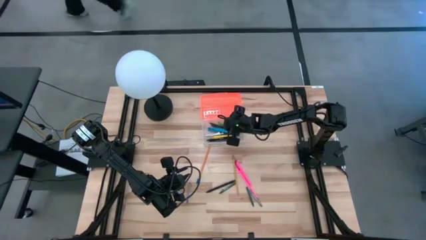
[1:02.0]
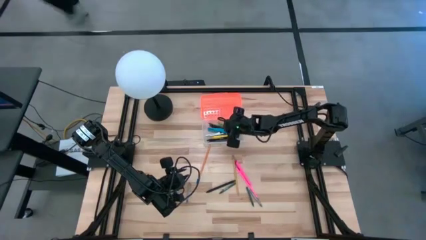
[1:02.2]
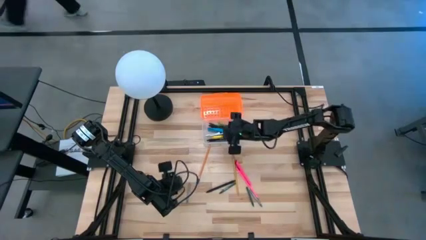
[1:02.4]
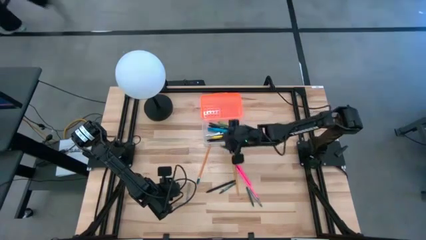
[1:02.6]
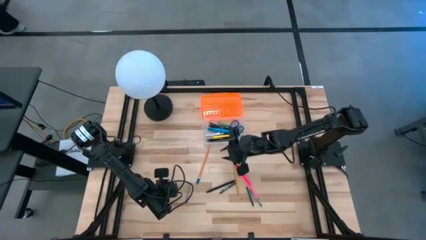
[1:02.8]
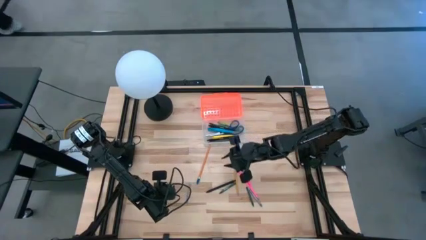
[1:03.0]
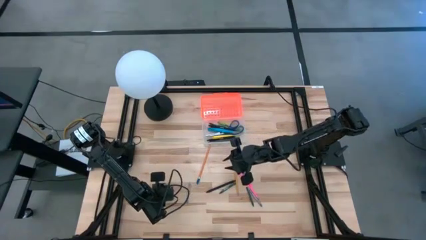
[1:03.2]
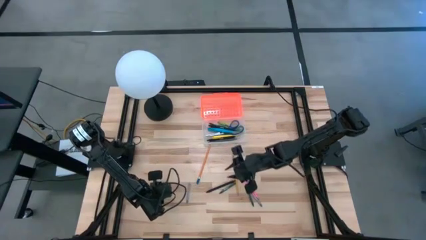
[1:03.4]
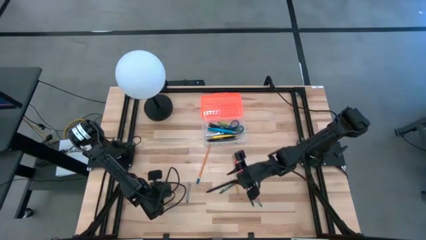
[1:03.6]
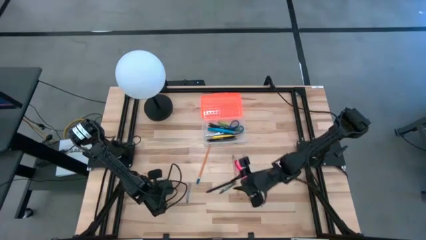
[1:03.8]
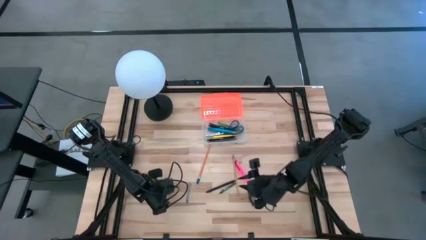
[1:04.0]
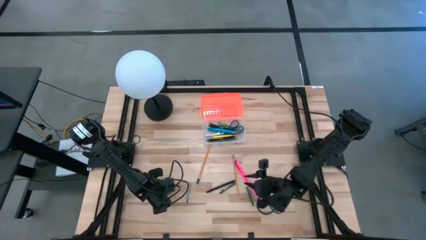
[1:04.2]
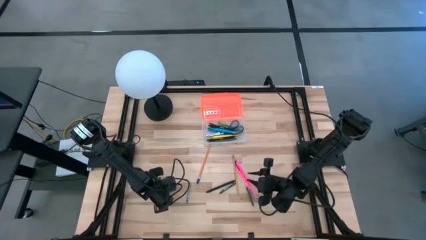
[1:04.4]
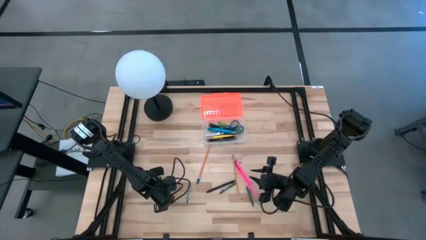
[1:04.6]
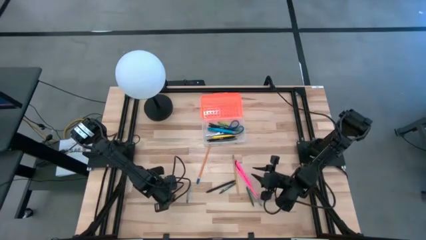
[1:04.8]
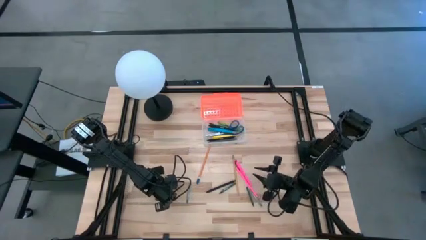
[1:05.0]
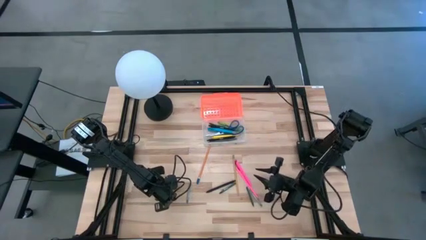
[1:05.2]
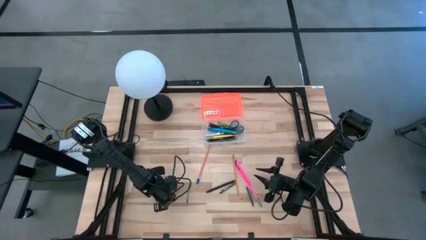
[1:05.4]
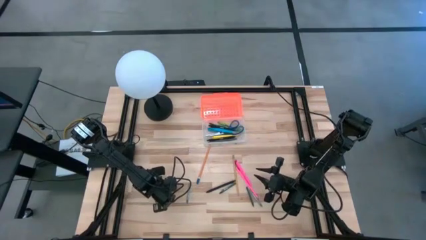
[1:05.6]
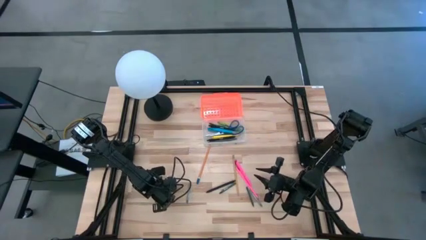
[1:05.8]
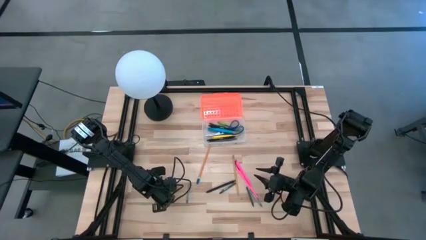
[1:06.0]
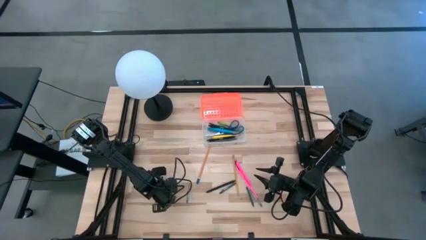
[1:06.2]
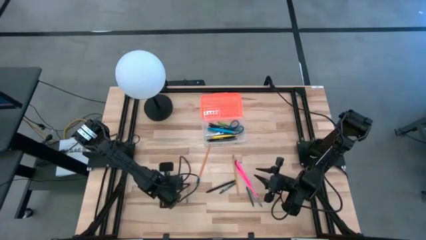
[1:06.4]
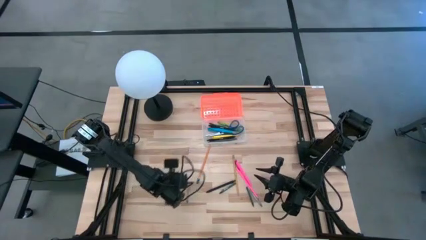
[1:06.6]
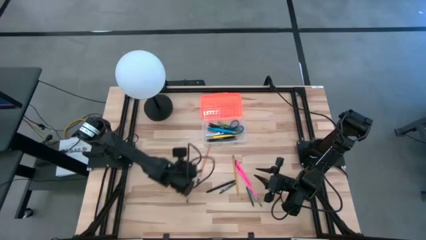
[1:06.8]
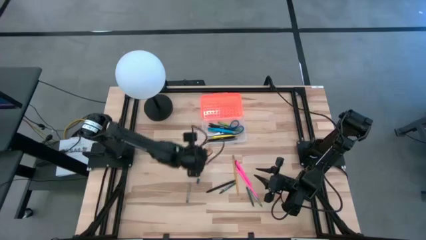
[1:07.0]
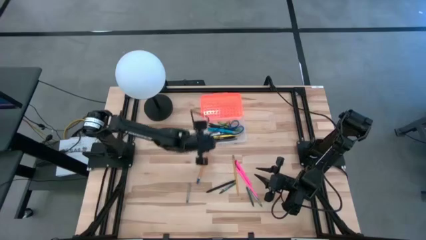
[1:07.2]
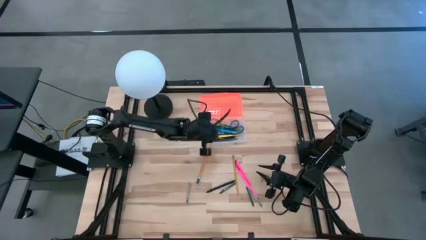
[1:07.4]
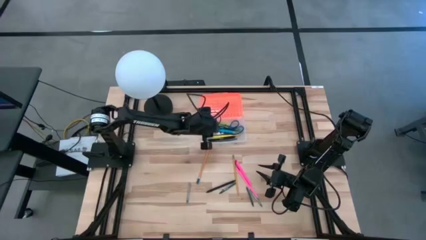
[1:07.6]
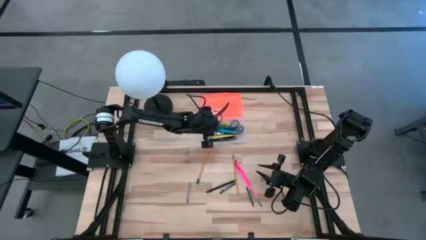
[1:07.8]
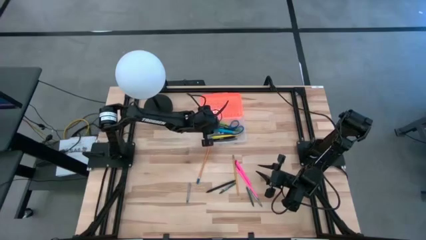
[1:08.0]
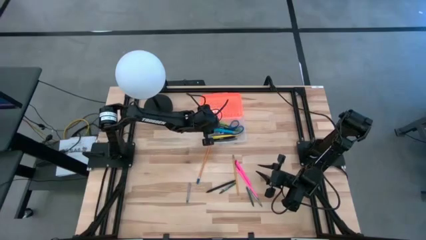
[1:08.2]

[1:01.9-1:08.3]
Task: Pick & place school supplies into a supply box
Put the green crayon into the orange supply box

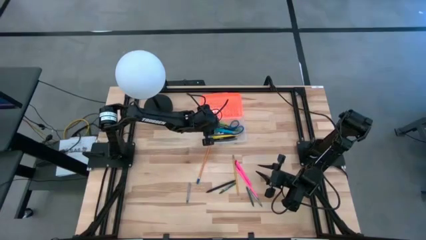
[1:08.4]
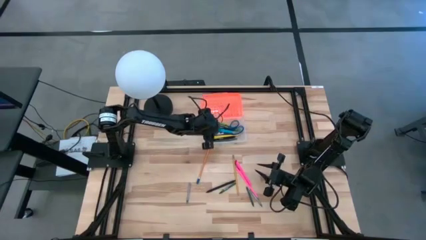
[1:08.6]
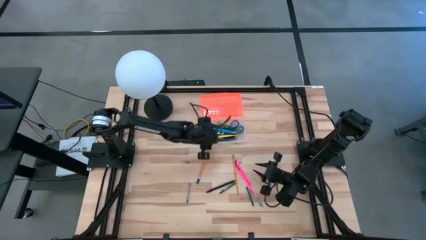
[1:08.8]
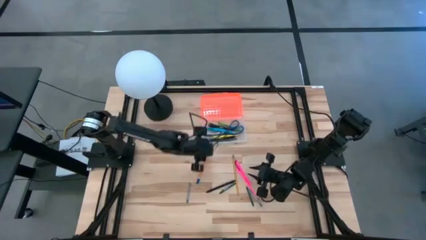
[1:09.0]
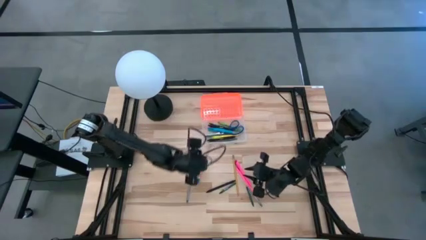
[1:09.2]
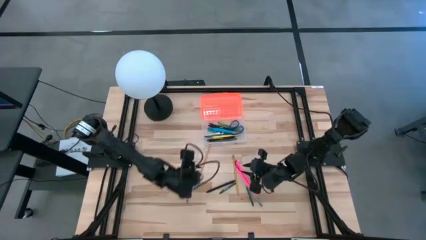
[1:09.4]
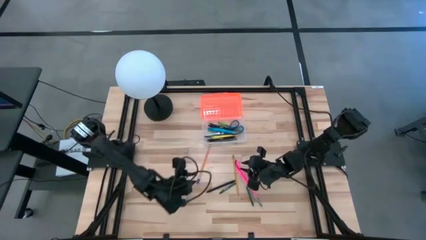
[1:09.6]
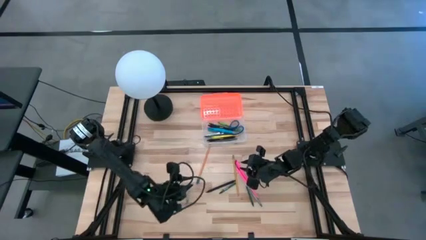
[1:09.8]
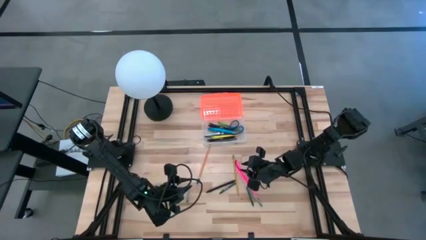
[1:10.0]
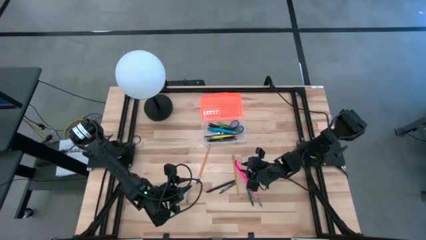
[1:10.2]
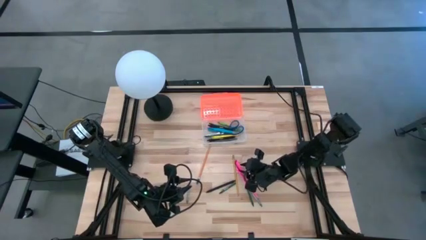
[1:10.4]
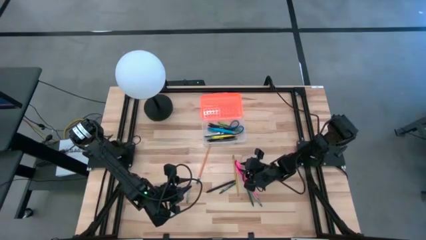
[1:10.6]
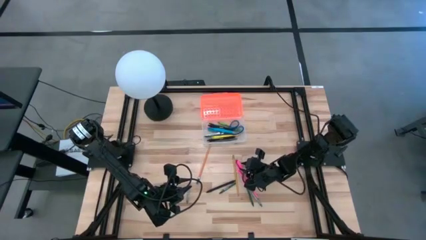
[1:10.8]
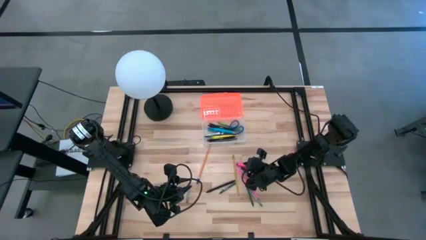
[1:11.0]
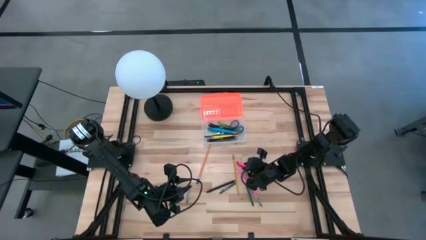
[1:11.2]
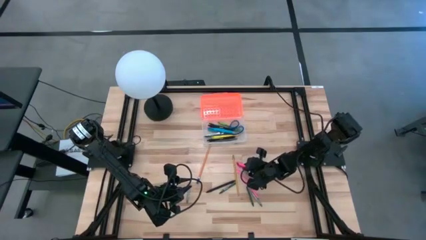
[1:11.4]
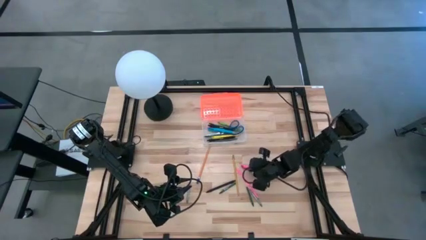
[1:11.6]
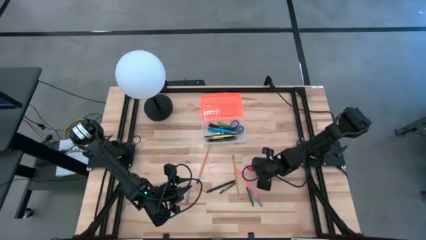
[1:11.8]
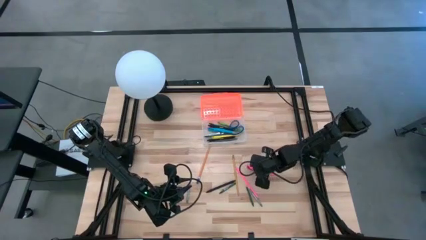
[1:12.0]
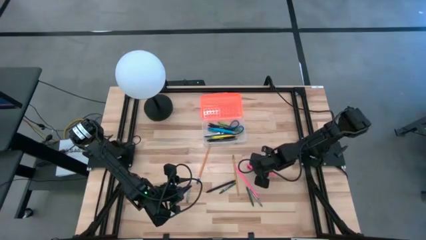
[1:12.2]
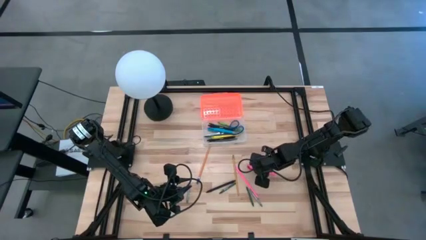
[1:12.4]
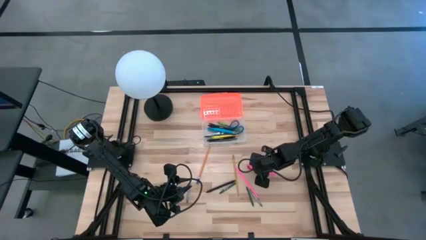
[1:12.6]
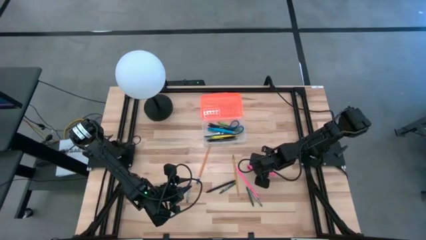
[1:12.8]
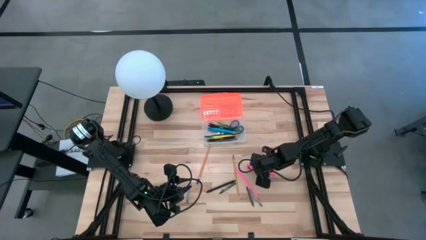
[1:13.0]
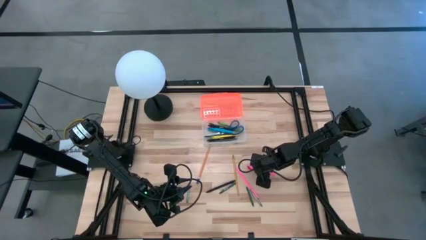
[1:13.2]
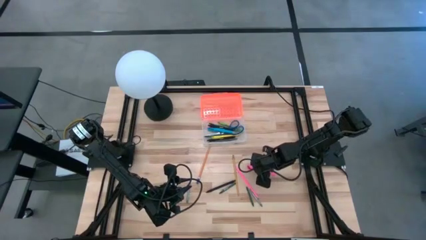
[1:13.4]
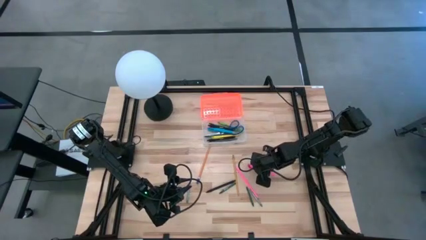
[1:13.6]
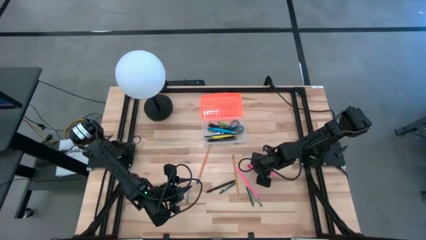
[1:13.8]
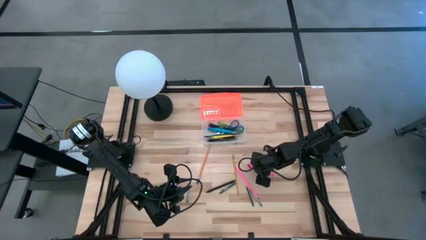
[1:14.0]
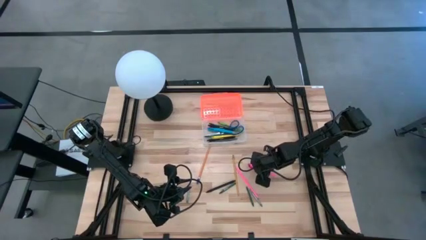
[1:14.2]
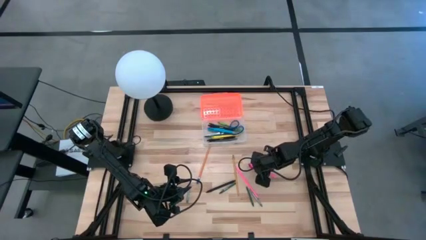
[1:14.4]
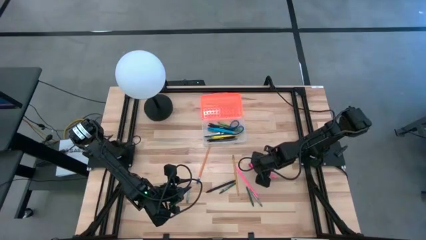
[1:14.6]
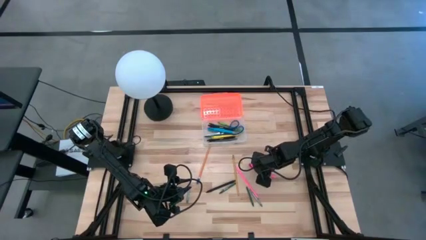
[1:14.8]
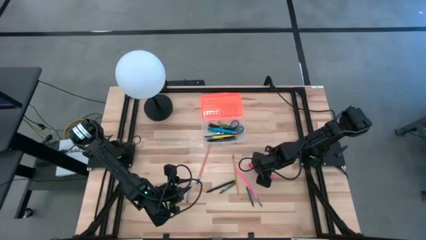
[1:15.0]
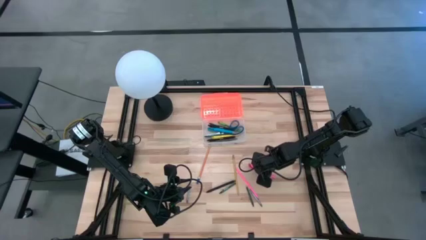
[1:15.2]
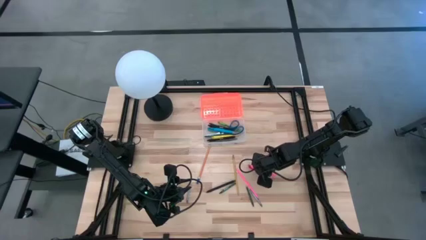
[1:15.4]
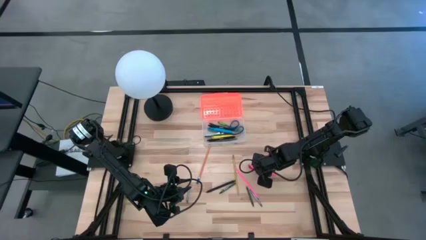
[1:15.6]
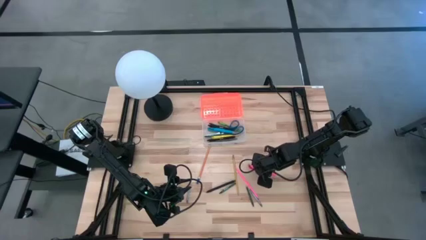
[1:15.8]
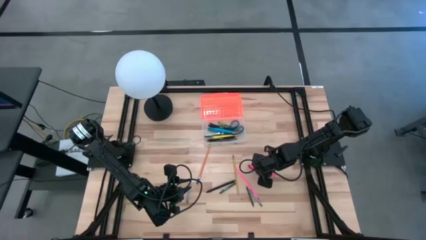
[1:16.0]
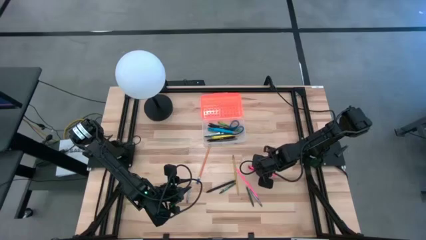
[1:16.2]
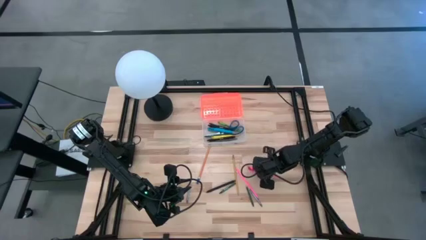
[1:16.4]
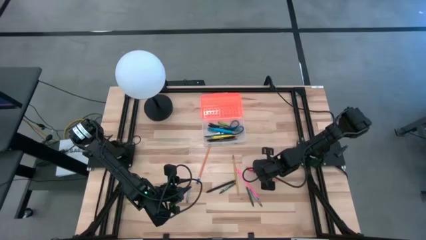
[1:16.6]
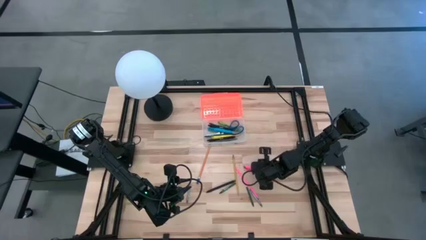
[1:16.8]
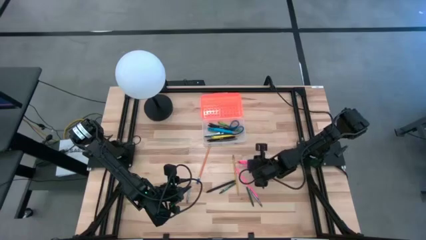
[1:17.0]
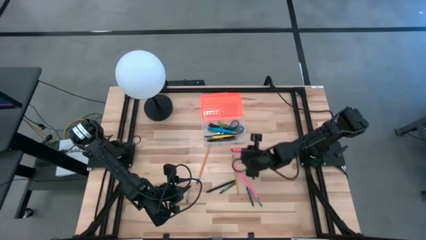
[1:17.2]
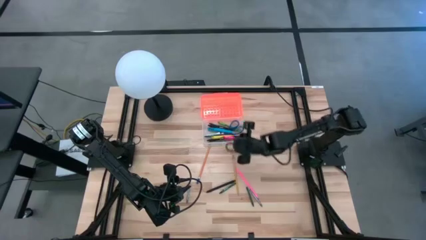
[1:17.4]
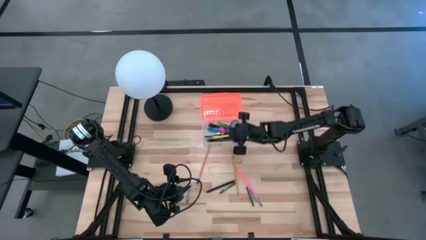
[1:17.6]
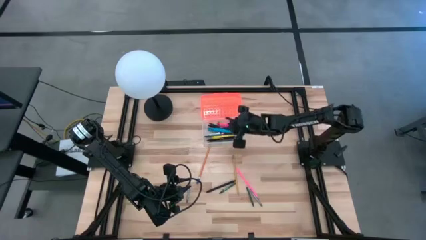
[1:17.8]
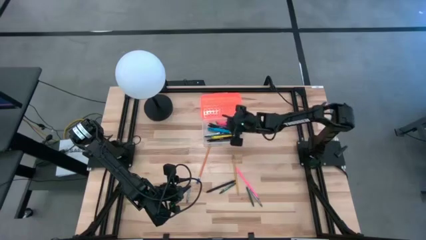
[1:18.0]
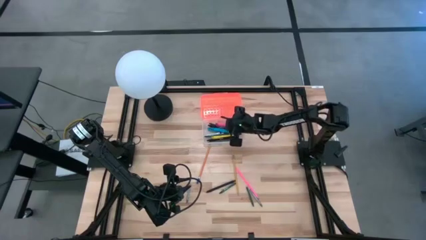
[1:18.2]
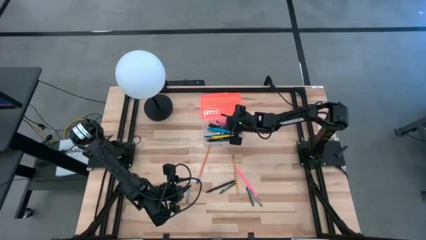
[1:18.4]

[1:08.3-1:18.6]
Put the pink pen into the orange supply box

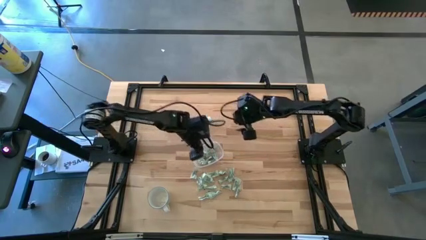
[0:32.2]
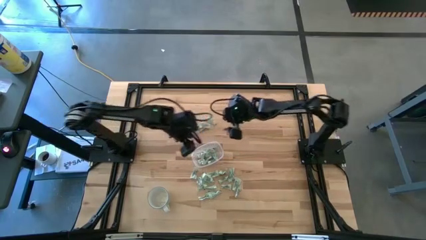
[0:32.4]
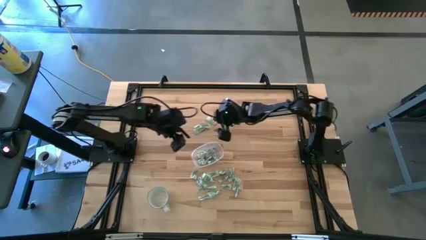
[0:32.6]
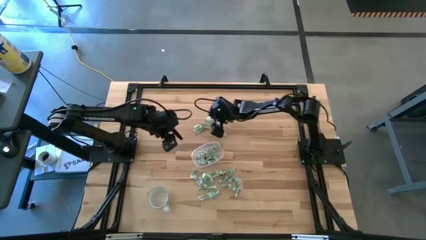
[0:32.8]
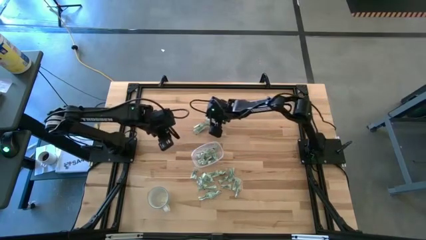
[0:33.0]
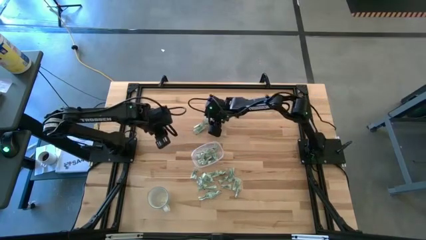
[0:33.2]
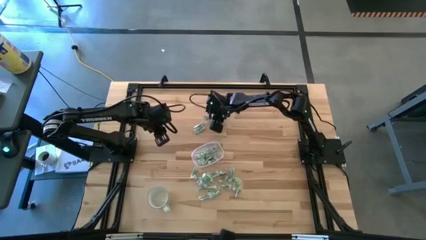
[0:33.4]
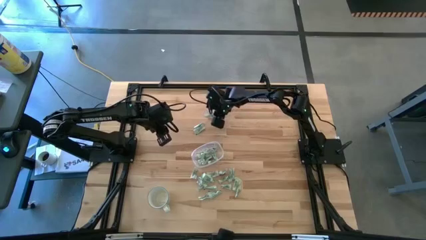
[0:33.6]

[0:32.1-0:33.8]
Task: Pick and place Stevia / Truvia into bins
Put the stevia packet into the transparent container
